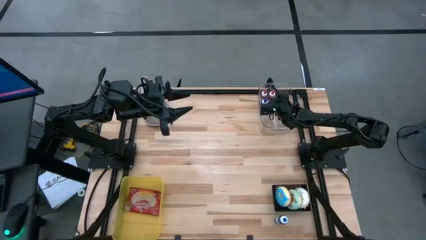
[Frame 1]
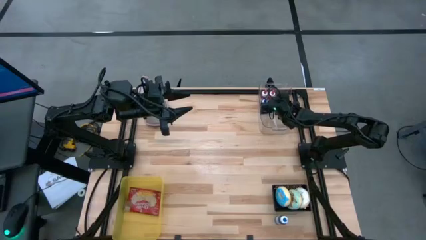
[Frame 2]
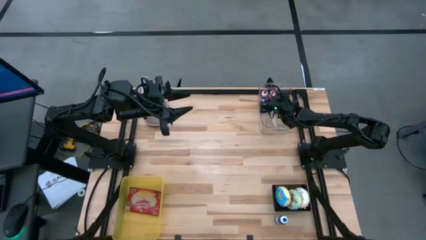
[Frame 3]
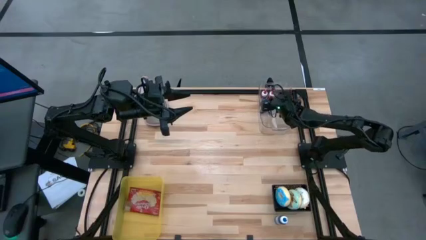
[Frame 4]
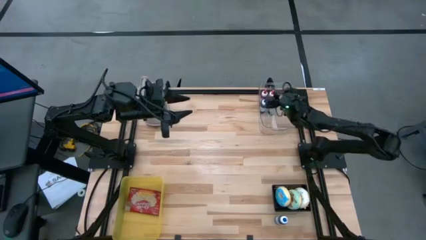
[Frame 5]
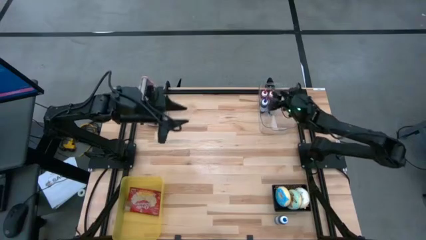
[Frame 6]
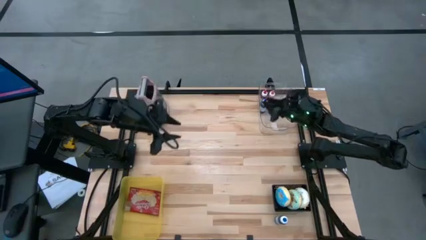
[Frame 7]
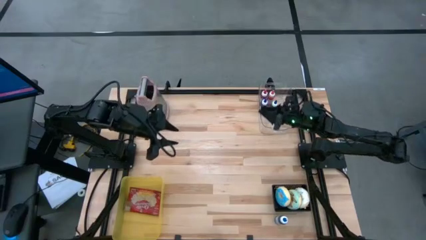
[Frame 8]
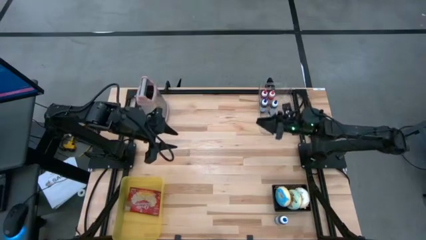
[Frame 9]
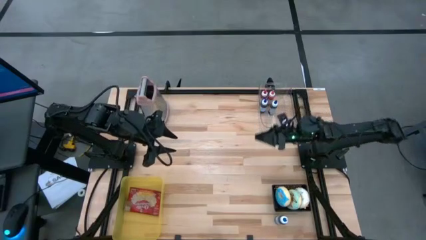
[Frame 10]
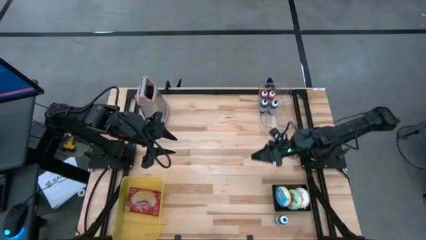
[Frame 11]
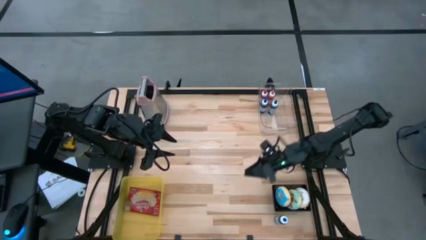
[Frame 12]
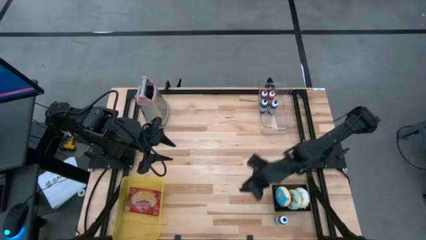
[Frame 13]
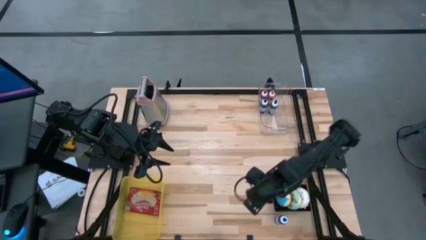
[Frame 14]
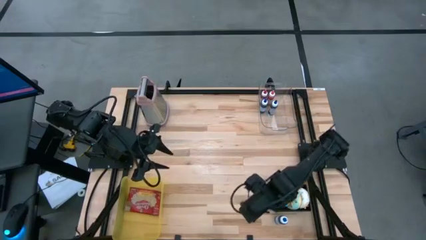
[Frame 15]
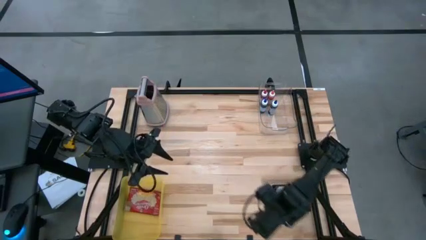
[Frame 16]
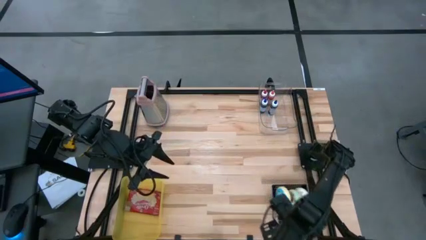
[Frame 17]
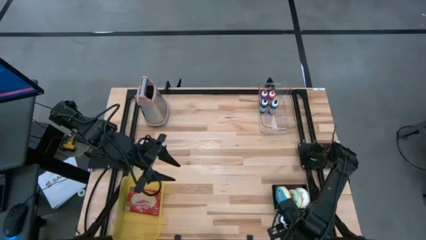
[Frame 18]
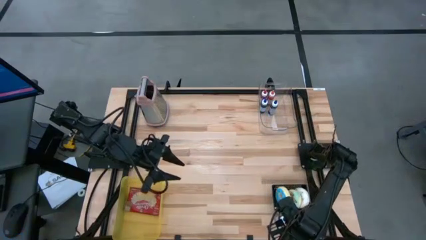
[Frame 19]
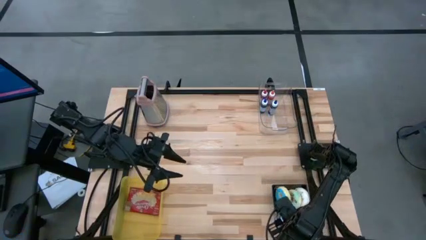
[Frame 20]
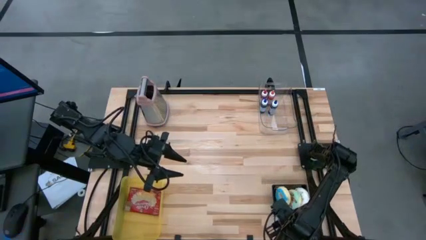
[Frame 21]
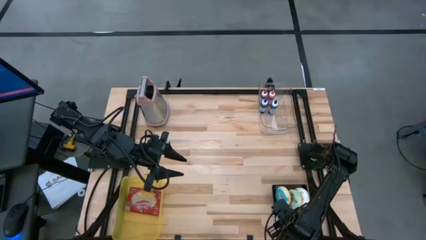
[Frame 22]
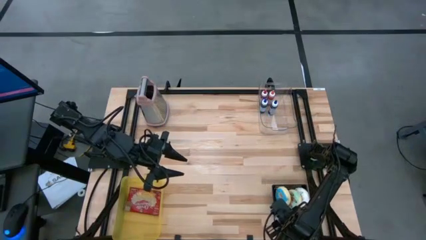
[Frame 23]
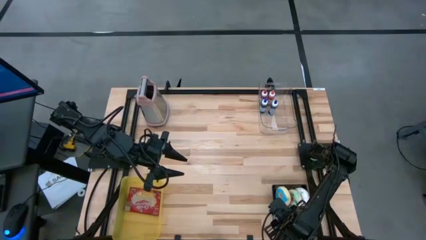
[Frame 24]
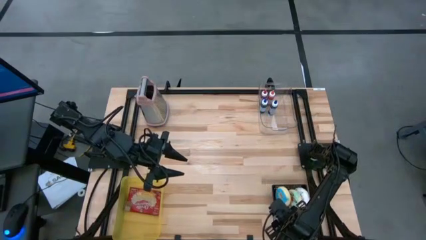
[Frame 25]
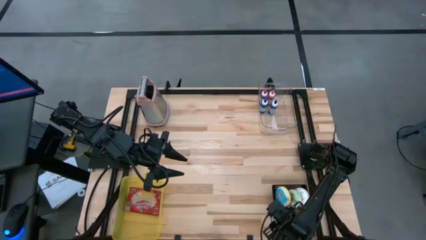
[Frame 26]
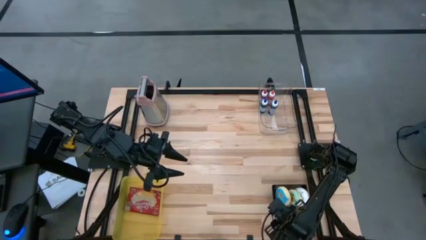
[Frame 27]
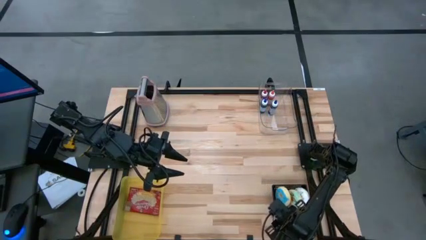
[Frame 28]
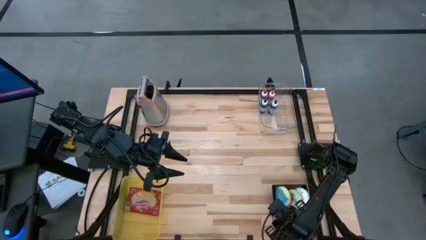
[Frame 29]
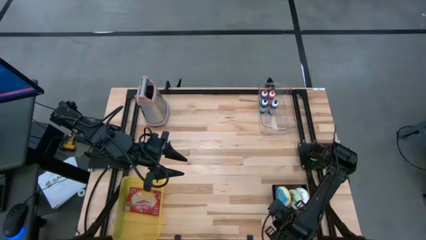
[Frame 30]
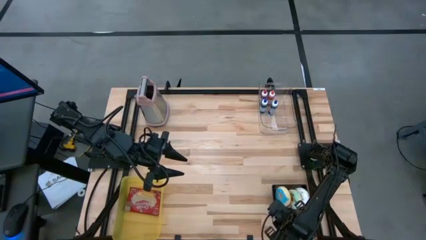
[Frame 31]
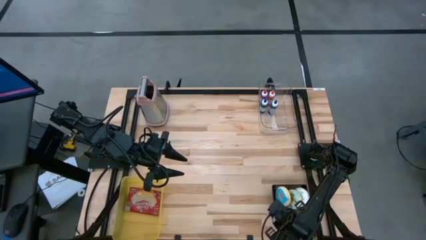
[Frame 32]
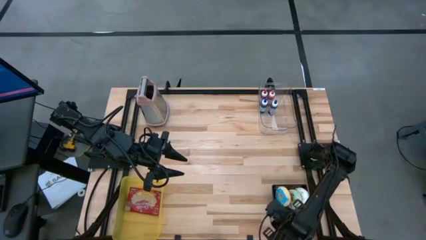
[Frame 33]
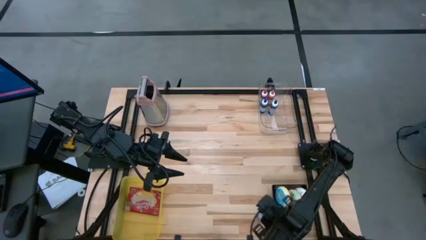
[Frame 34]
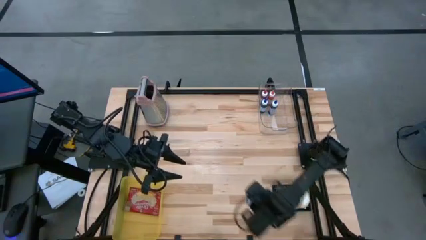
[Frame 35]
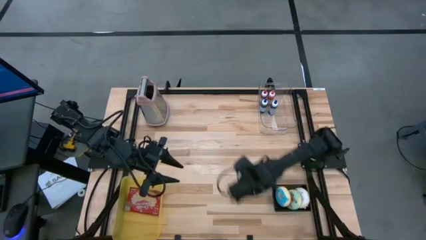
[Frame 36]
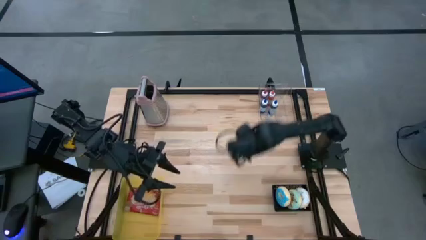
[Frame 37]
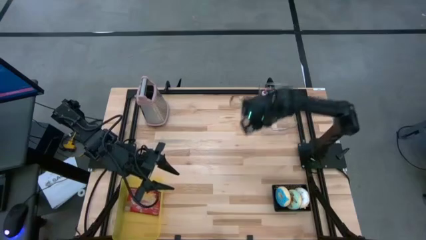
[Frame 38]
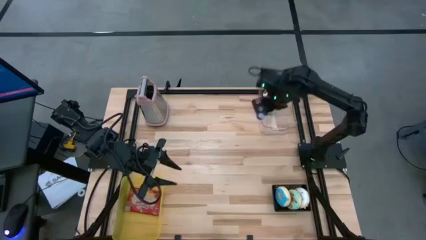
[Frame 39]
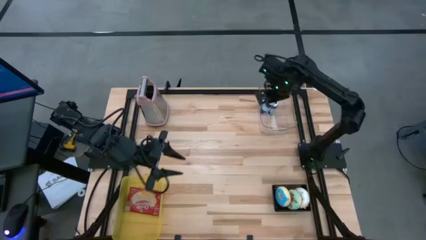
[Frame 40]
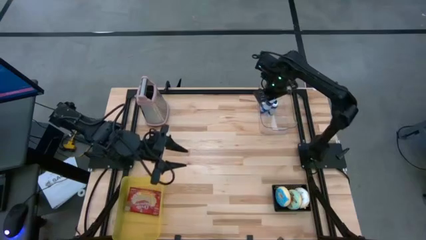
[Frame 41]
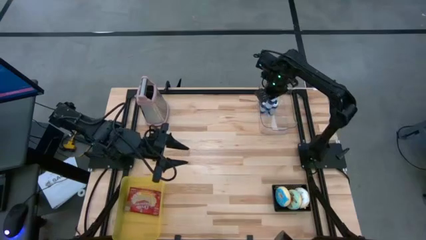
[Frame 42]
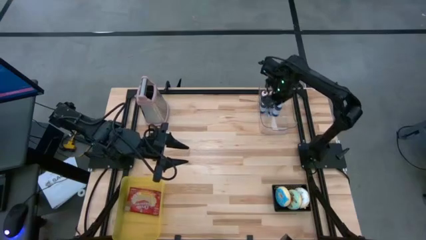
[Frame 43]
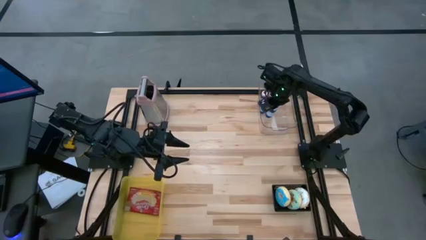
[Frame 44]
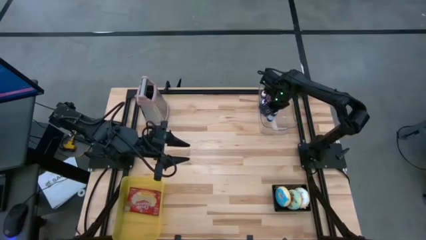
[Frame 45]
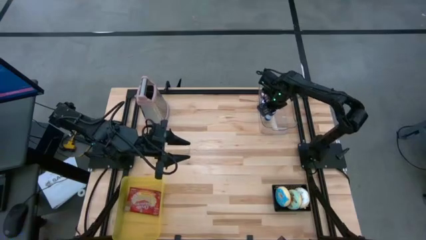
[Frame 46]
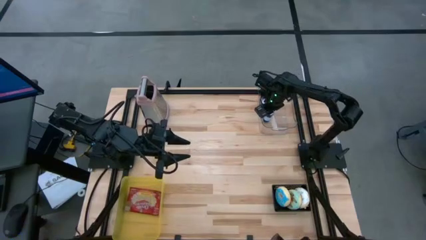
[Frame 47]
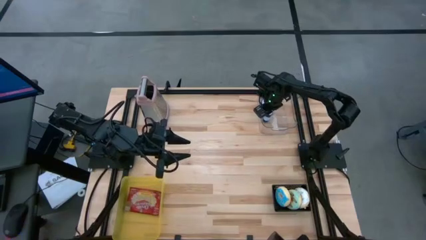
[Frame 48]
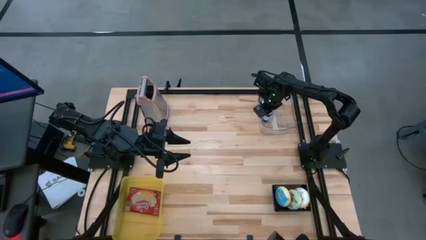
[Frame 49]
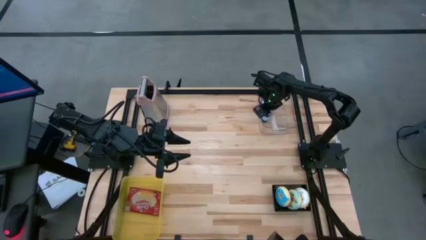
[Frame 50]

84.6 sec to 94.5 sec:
Put the blue food coloring bottle into the transparent bin
